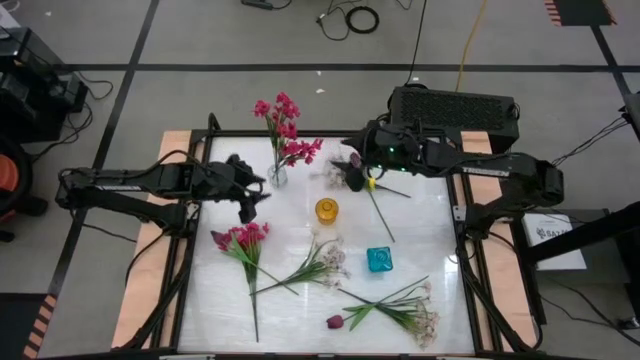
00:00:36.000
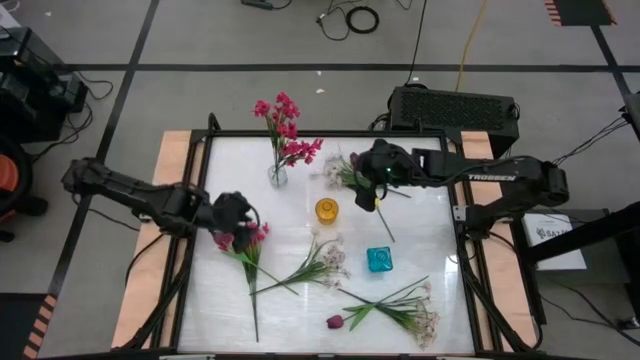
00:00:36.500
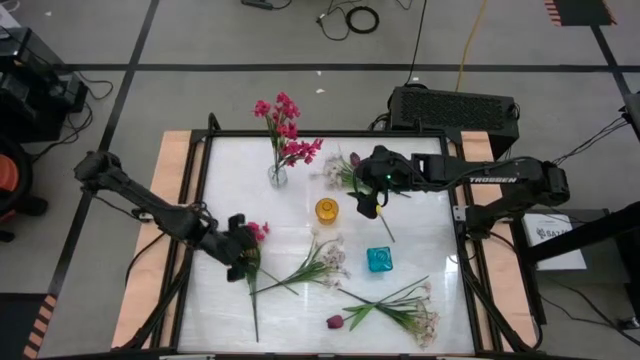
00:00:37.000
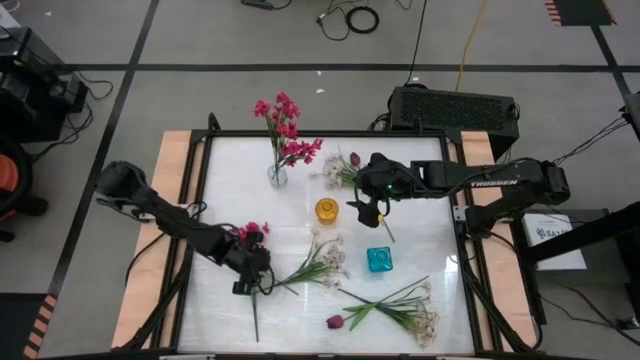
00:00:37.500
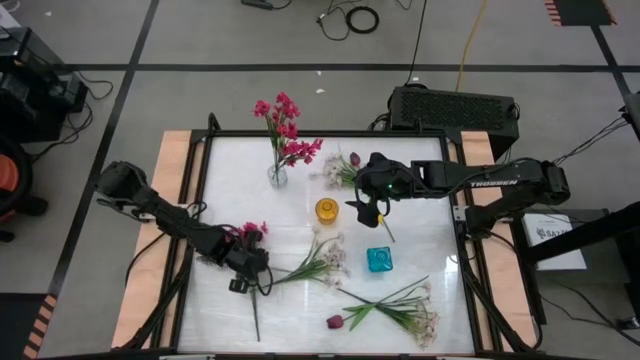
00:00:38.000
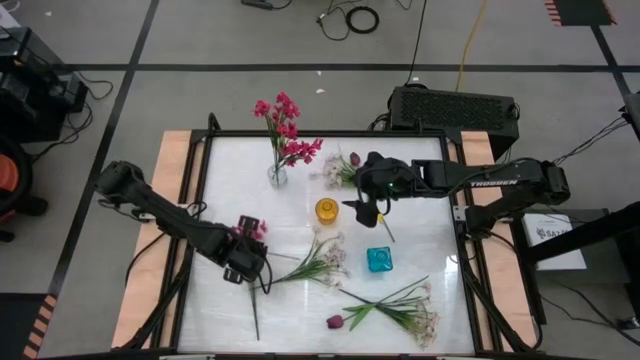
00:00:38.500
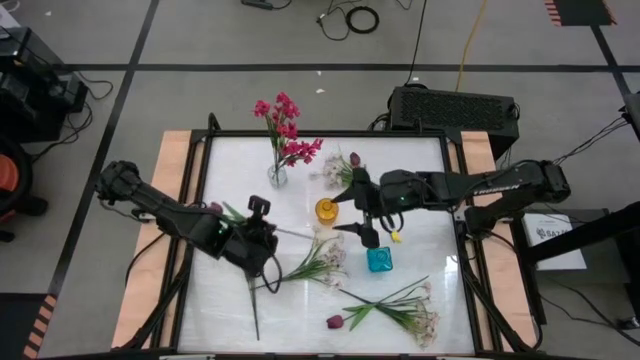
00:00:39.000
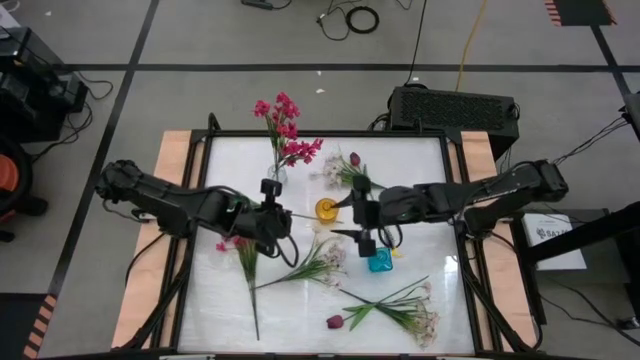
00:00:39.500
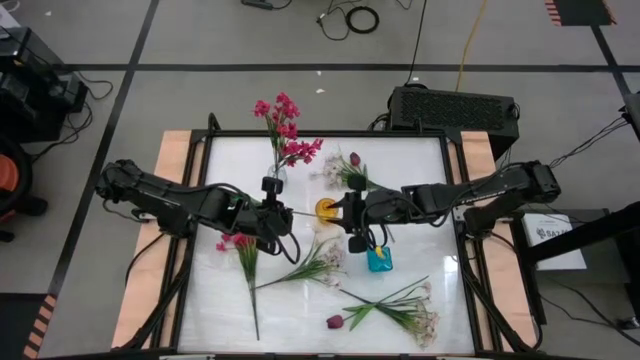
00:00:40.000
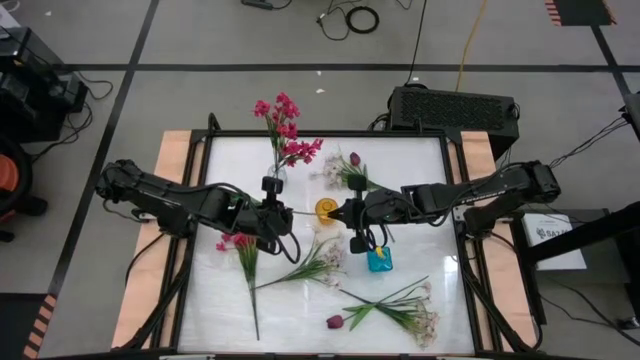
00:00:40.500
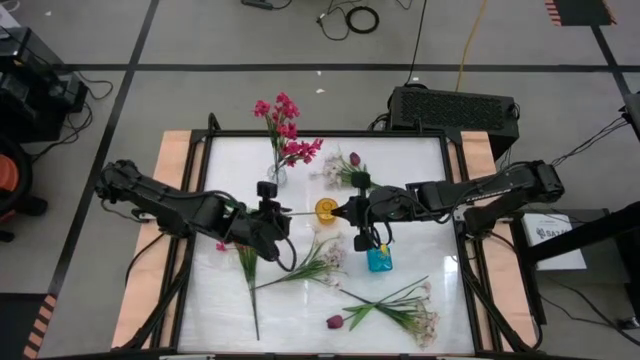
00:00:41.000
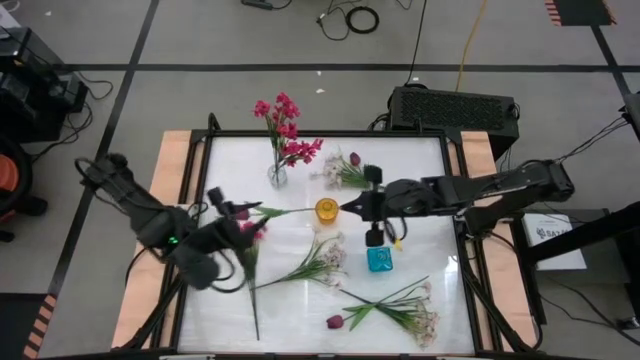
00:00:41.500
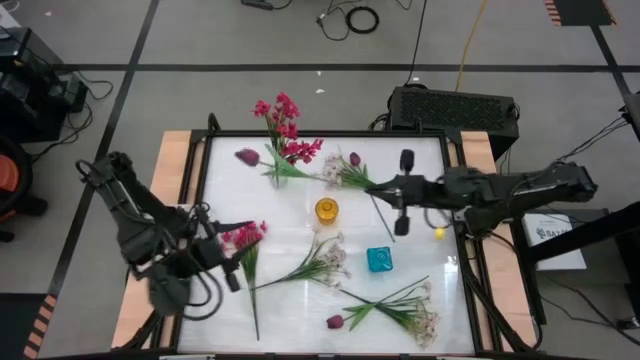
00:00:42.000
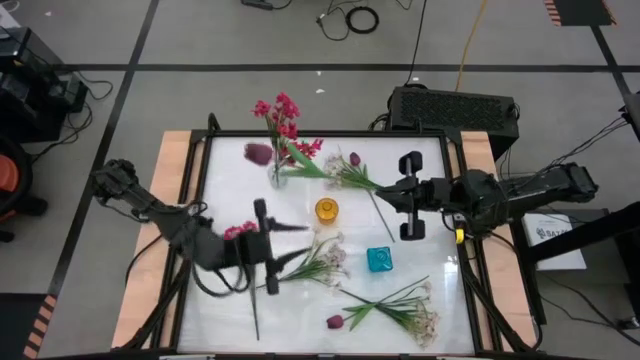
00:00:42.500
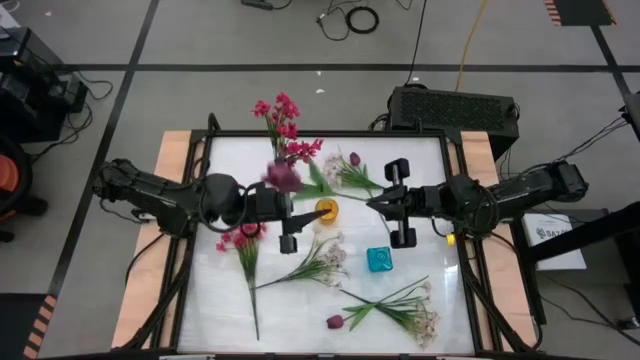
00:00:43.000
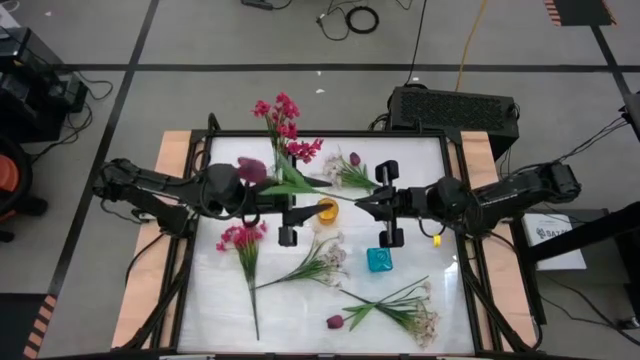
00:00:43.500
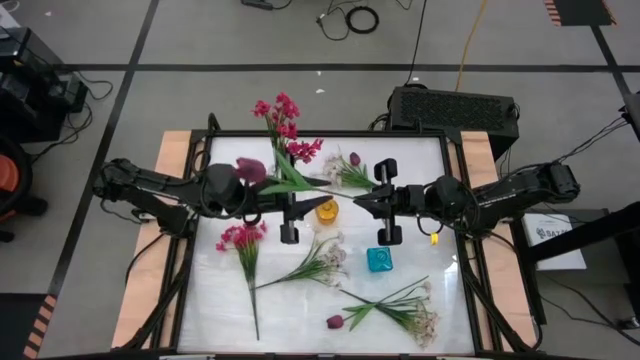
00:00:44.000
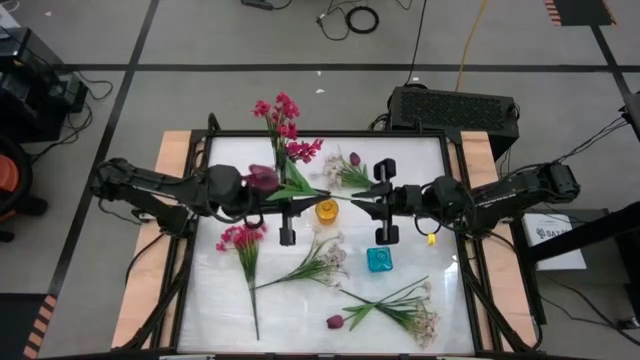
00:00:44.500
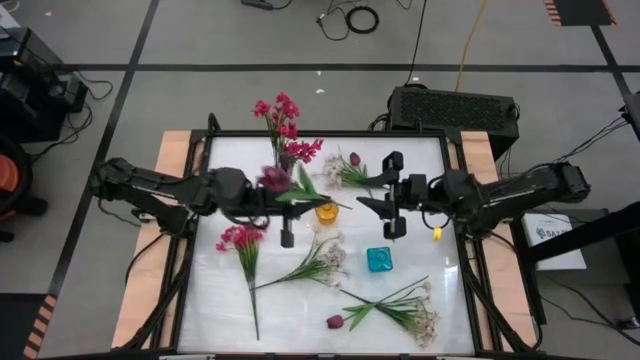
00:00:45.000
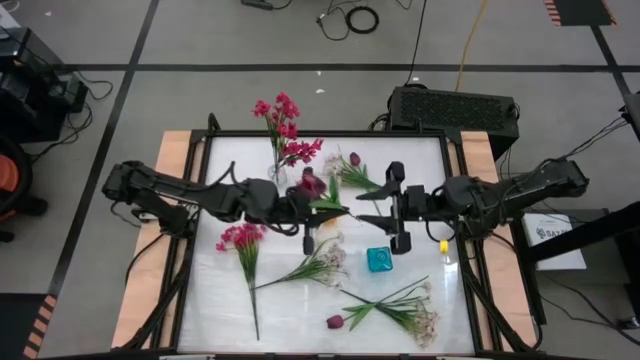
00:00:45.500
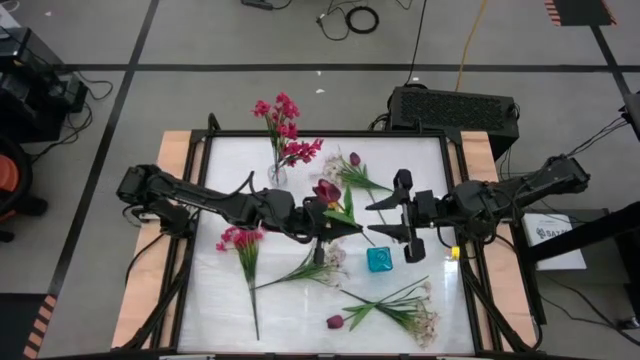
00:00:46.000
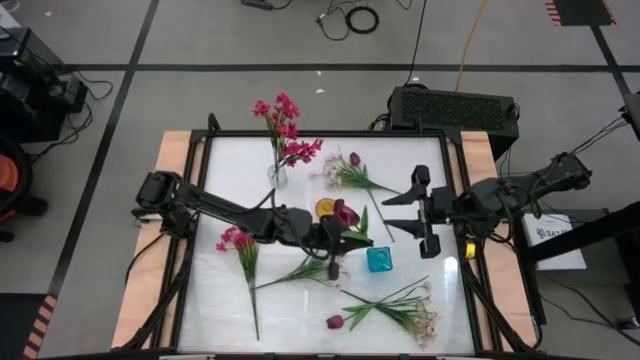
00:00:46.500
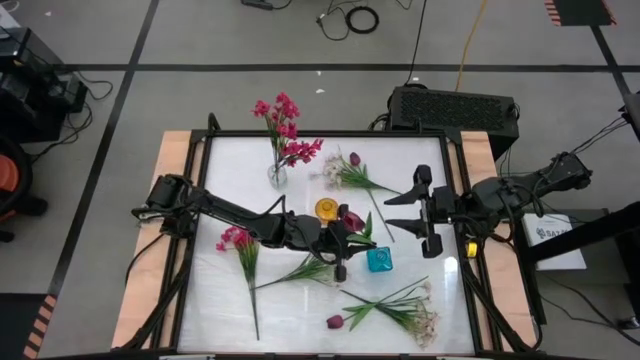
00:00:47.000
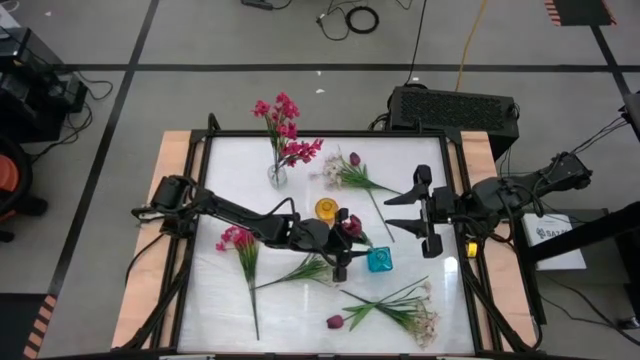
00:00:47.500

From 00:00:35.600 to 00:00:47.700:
Task: Sort flowers into vase by color
Put the middle red flower into the blue vase

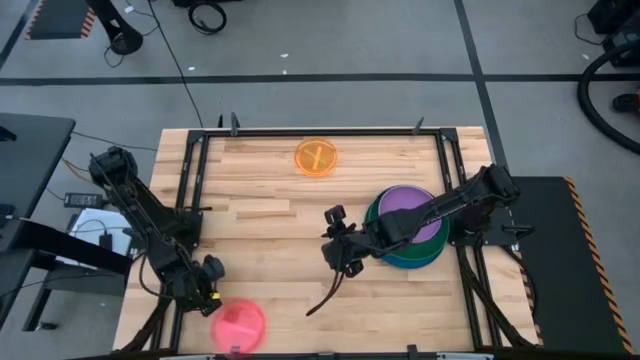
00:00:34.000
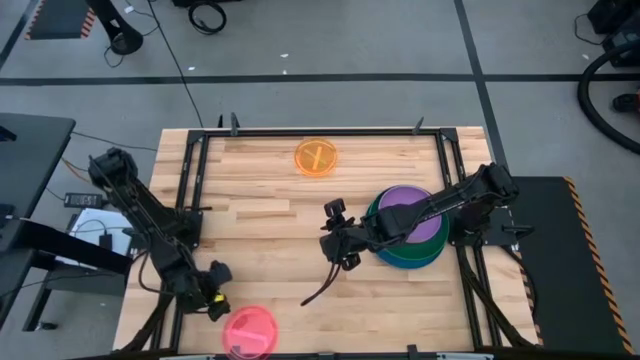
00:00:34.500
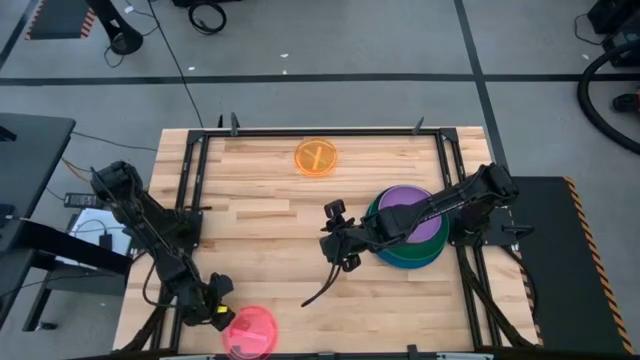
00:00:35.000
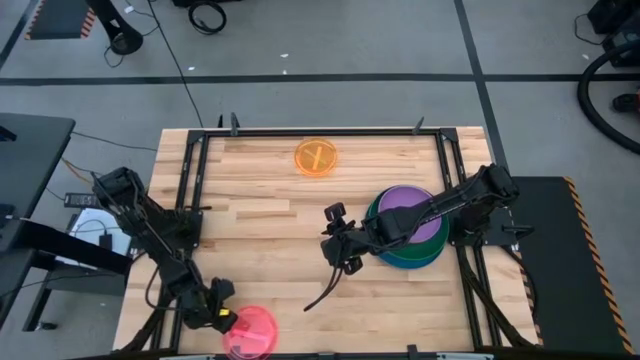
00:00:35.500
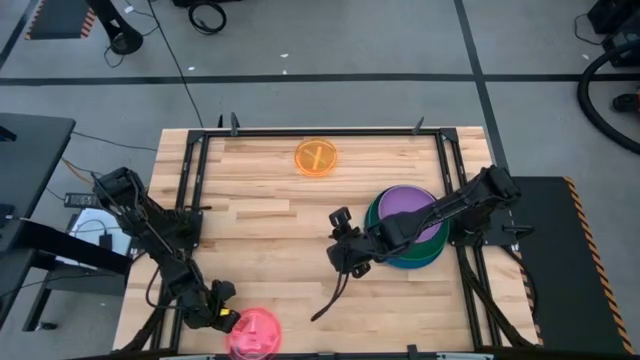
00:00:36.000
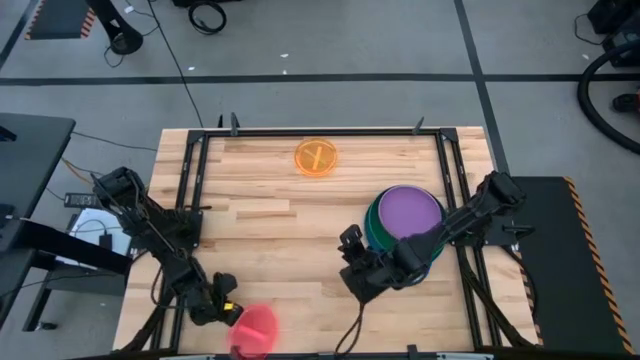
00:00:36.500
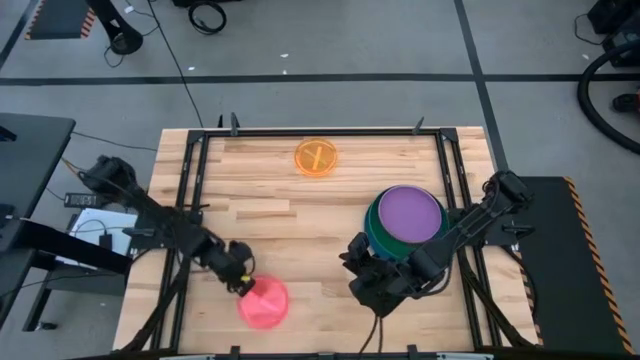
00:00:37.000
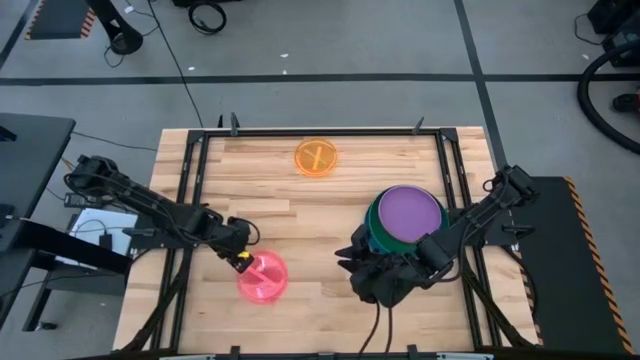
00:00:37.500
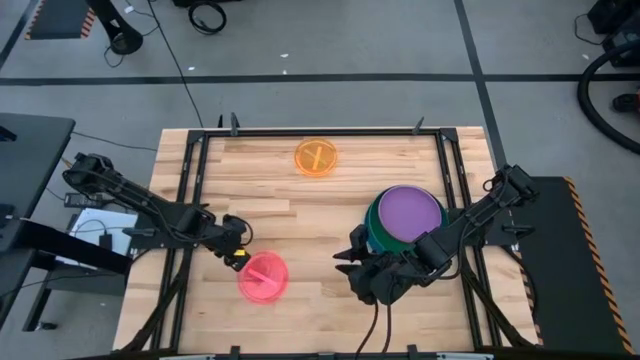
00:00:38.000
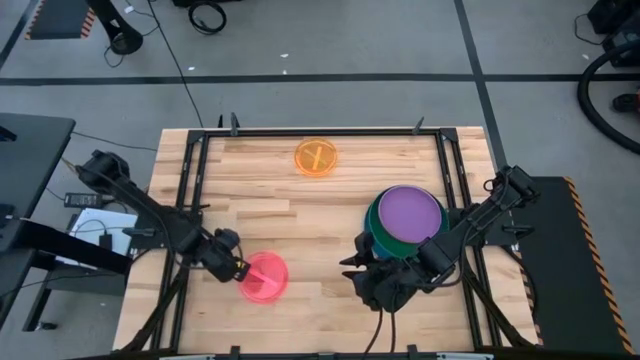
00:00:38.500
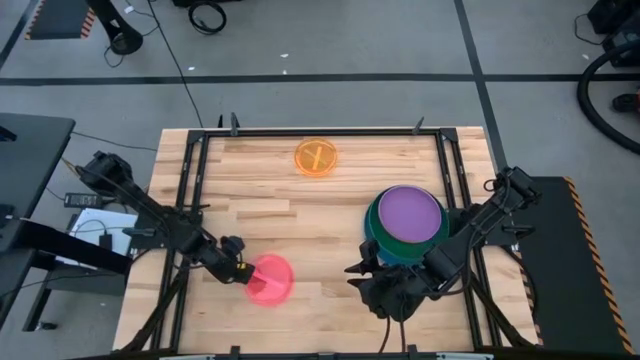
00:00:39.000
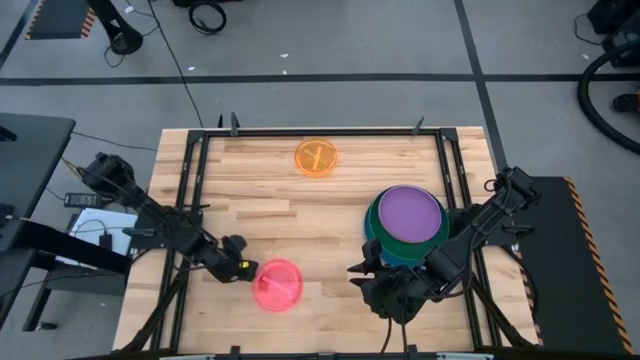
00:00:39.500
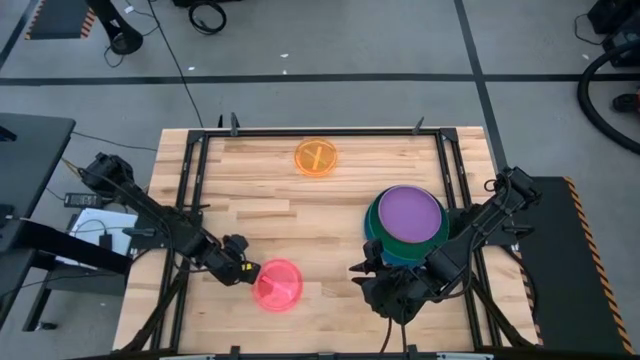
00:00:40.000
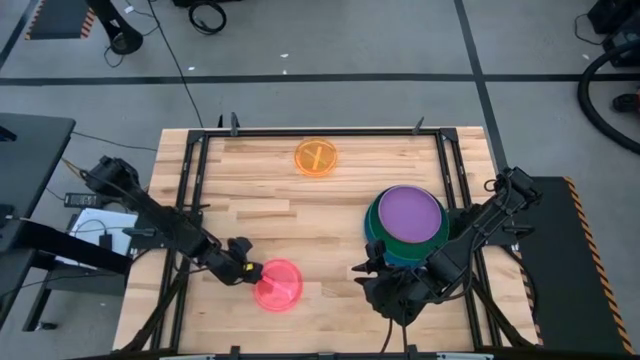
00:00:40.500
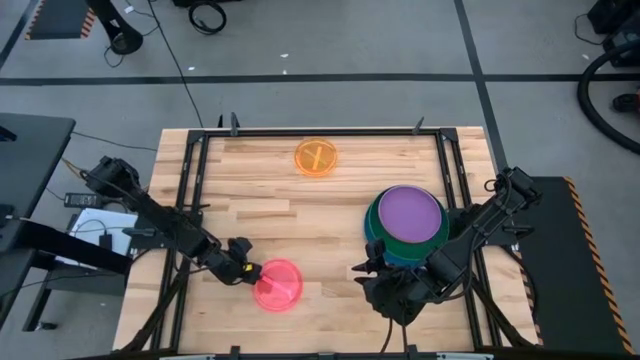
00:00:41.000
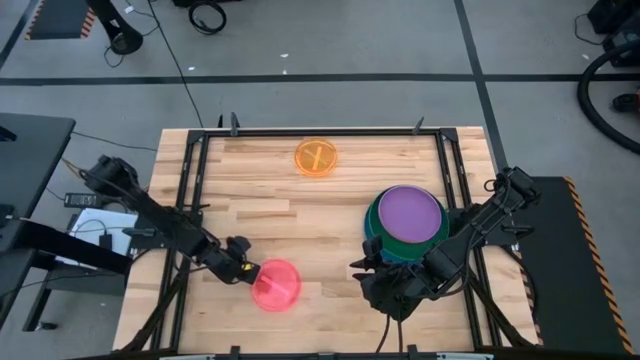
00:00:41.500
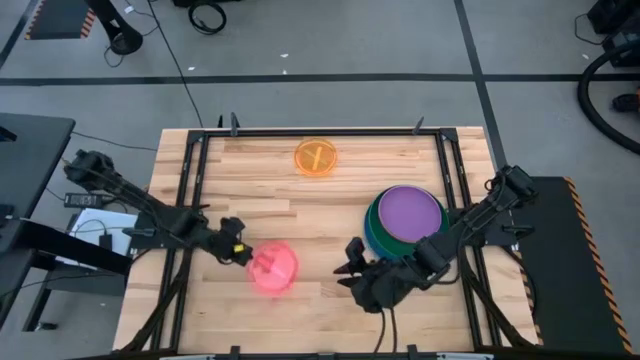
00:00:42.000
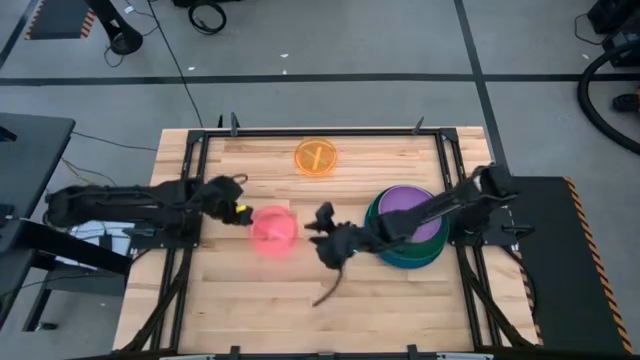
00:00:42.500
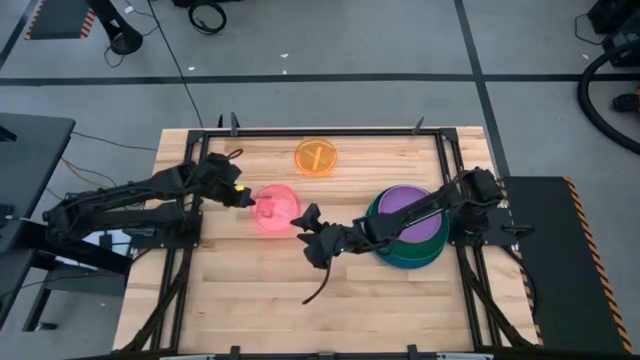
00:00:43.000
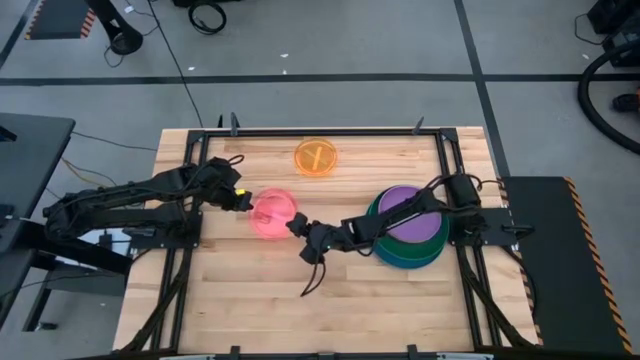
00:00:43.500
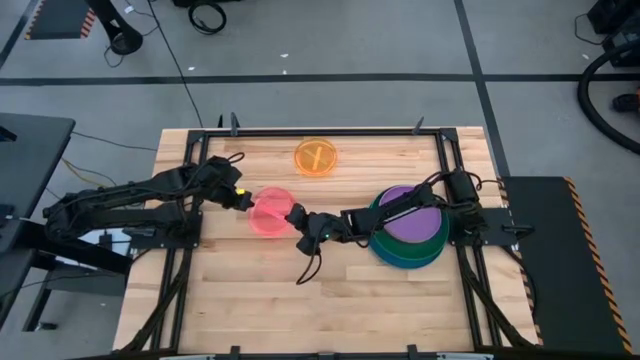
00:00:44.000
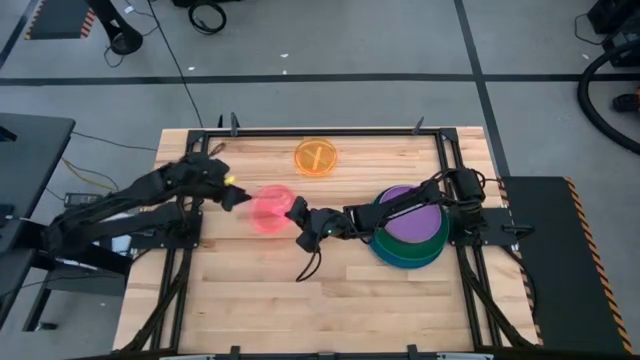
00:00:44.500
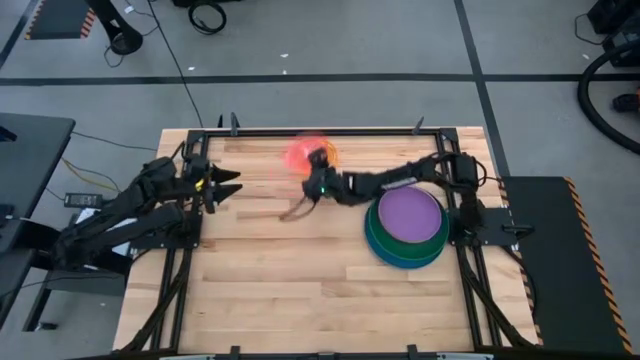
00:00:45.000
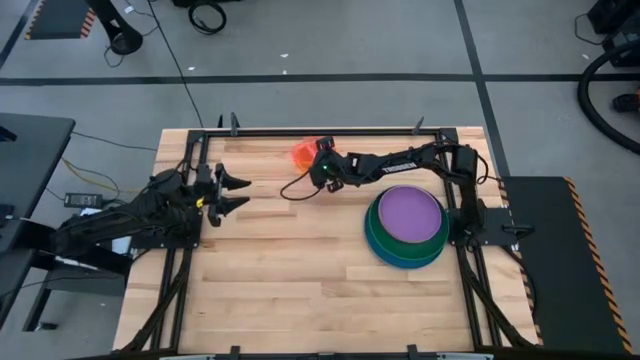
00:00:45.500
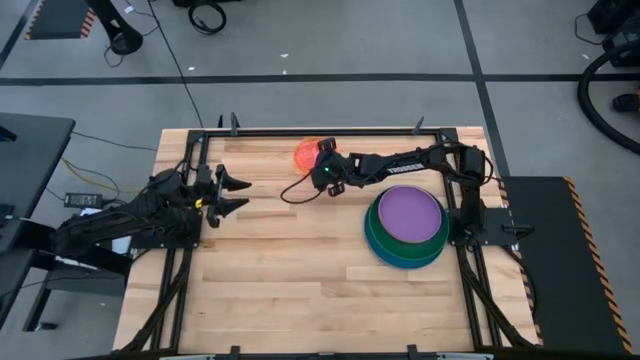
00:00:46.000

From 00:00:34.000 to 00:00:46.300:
Task: Stack plastic plates
Stack the pink plate on top of the light orange plate
